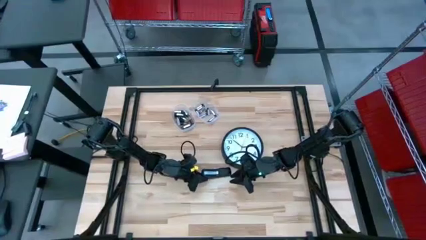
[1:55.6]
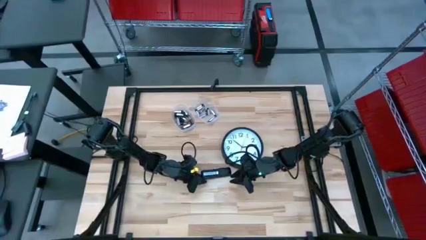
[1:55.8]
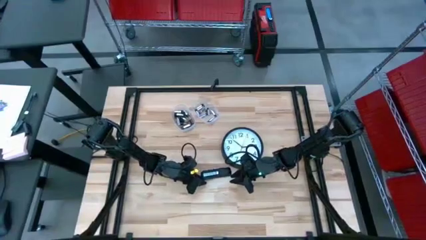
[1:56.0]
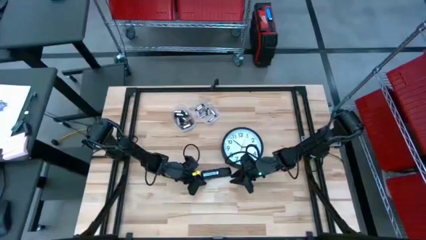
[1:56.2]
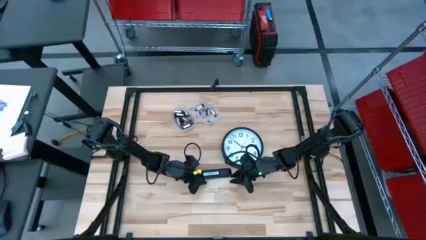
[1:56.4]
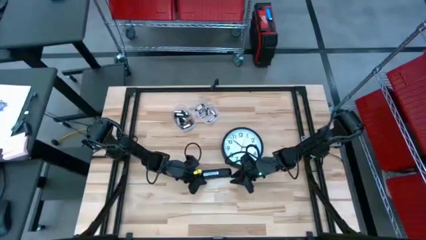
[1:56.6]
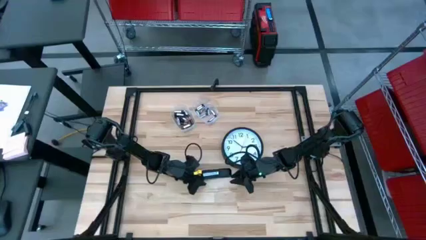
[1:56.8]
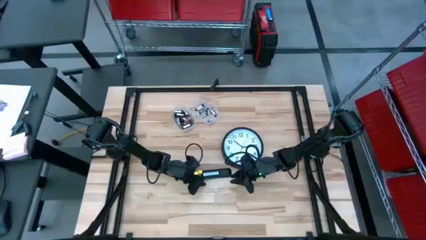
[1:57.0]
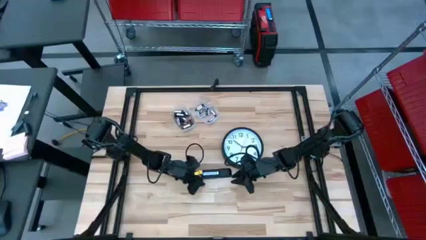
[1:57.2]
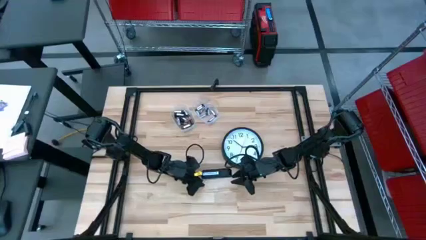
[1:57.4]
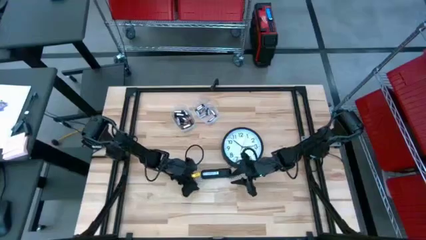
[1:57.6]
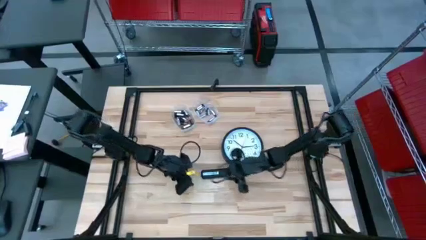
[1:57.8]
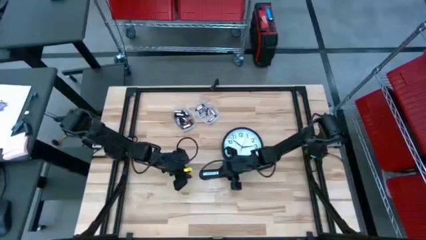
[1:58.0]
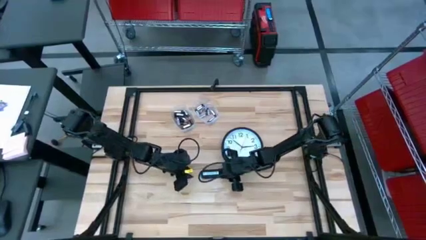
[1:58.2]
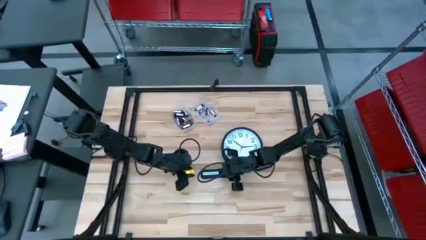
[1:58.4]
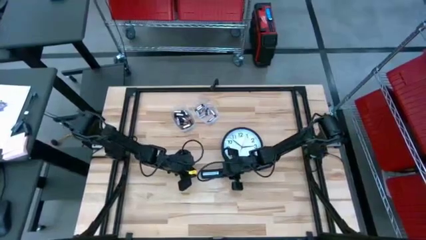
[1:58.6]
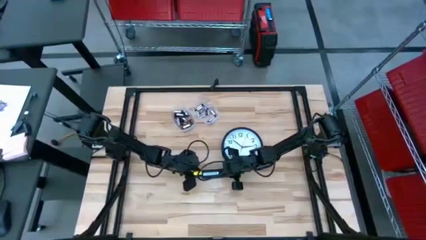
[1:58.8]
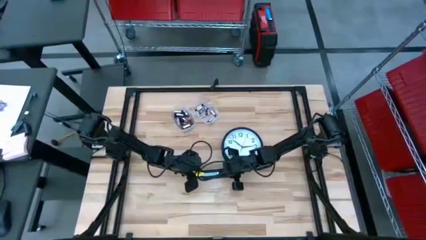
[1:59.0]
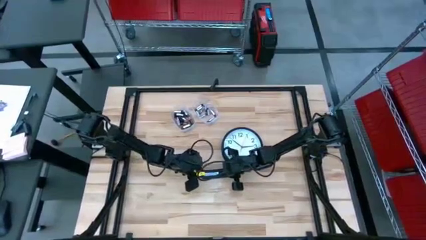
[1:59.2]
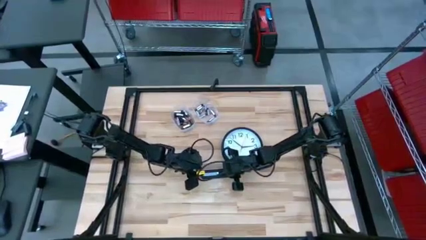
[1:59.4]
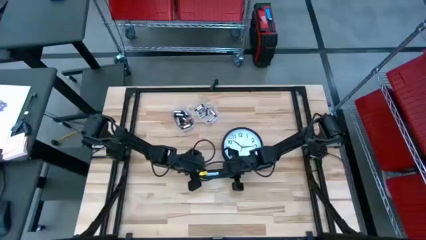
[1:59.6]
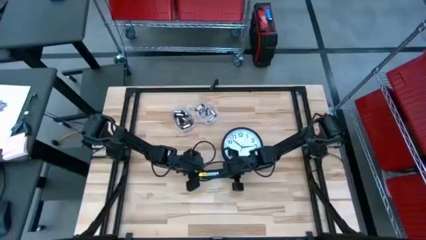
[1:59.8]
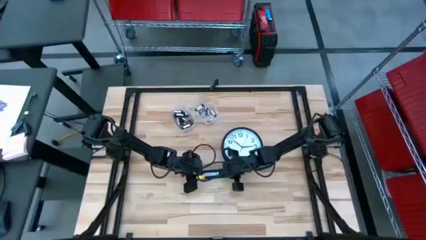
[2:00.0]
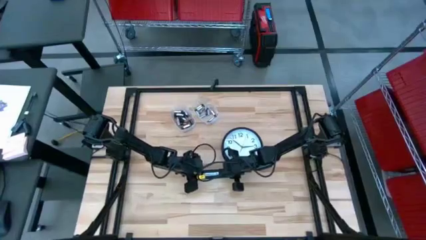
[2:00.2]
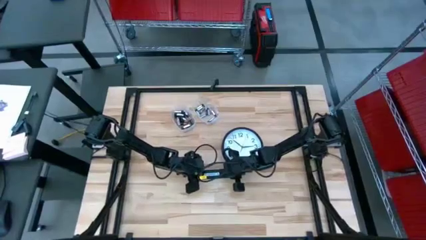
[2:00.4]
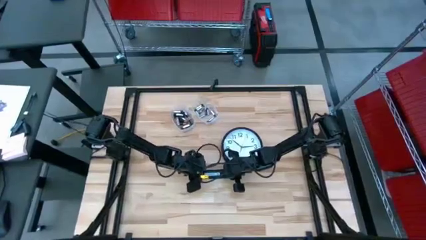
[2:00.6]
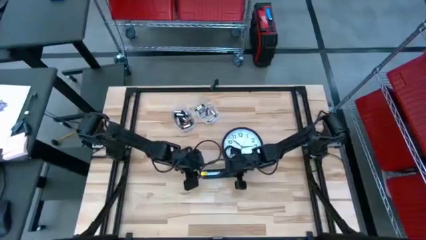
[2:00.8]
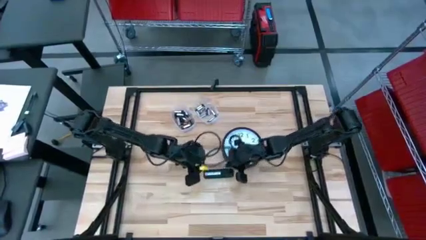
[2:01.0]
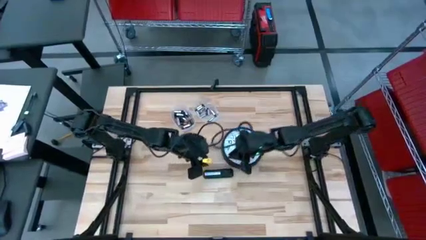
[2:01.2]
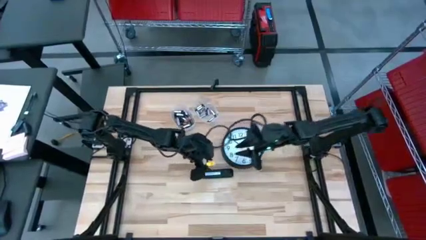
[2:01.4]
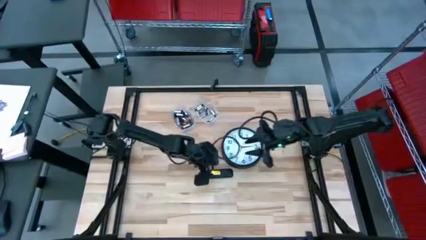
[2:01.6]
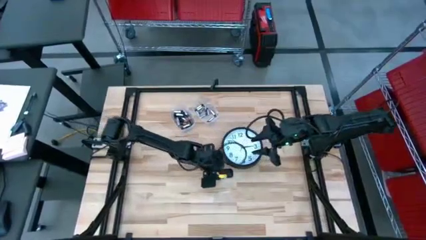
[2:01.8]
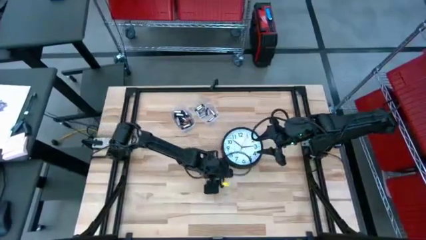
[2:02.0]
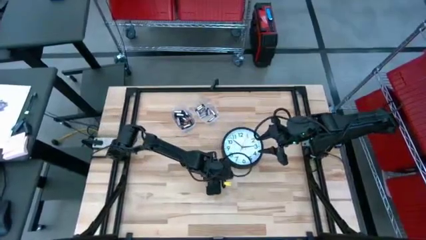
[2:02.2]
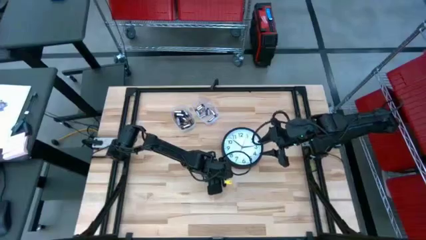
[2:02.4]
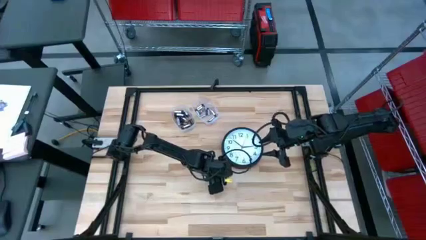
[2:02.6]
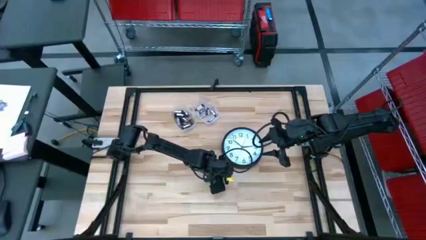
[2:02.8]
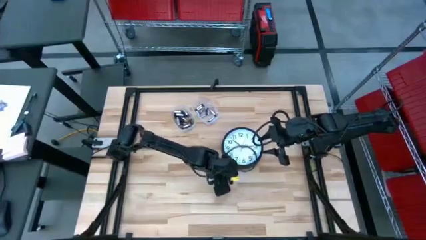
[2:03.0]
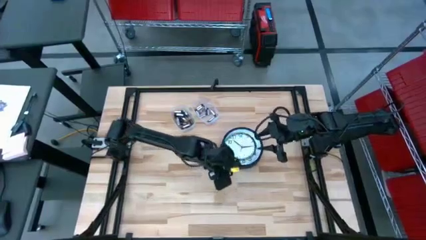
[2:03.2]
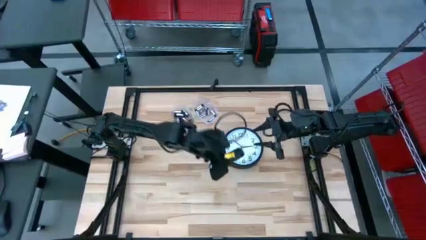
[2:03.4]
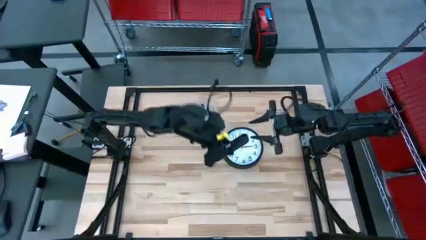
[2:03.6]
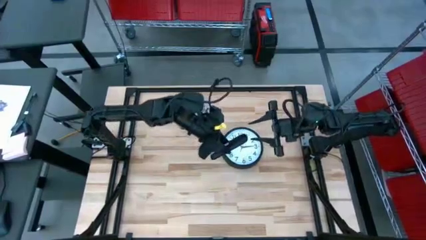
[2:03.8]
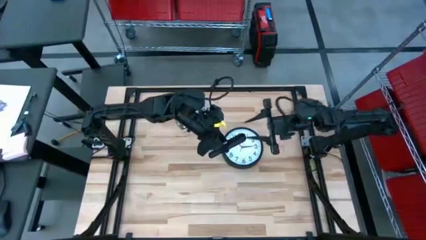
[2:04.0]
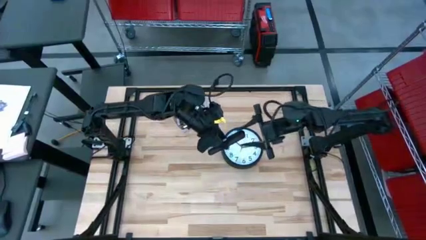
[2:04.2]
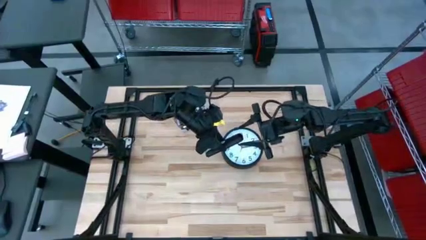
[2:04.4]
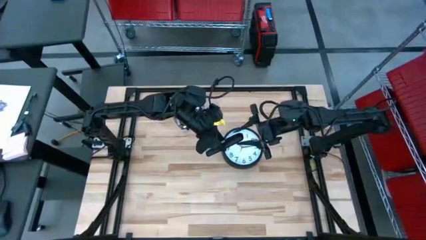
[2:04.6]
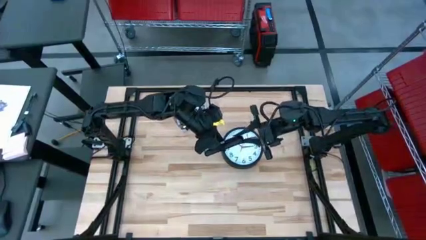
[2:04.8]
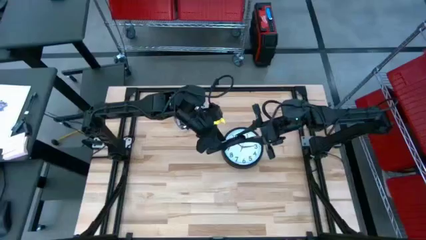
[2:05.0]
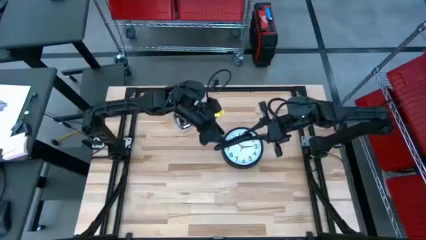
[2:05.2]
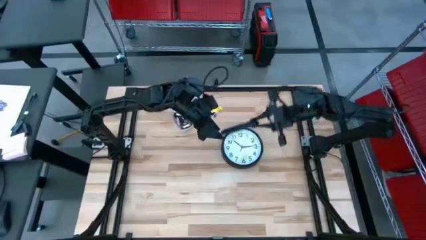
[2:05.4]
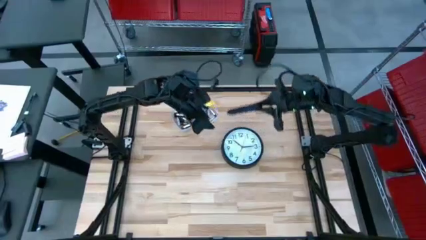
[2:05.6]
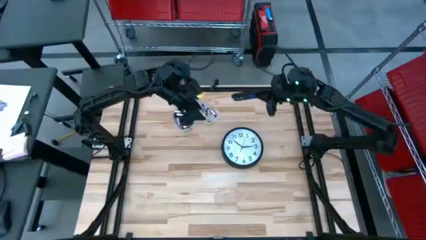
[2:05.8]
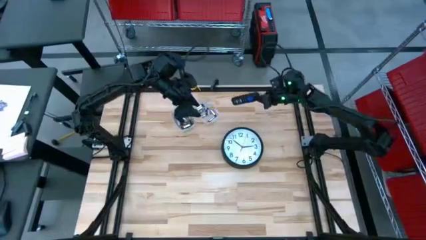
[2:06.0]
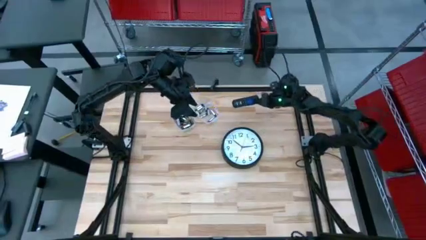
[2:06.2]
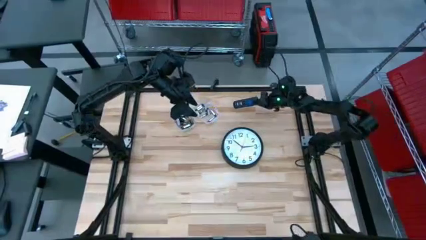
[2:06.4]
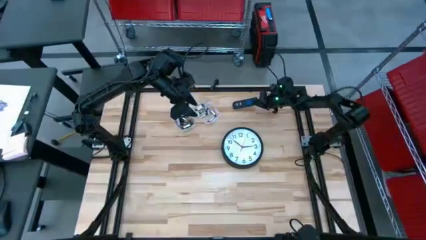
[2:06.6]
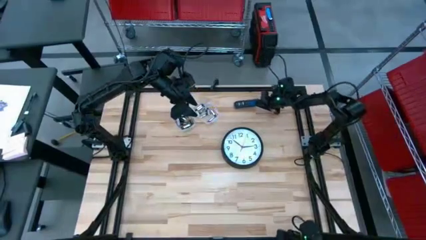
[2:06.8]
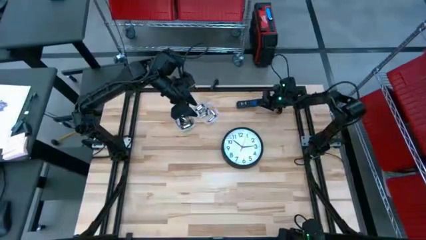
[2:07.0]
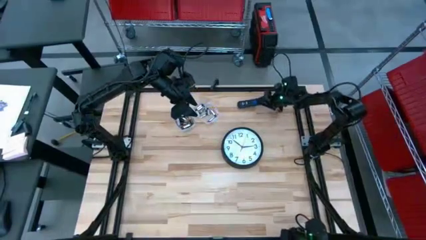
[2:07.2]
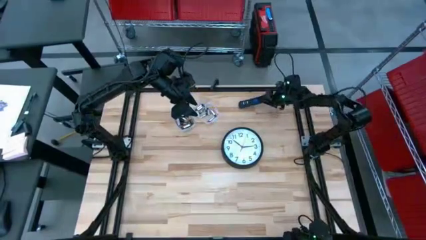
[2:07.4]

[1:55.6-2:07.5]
Task: Insert battery
Close the remote battery cover
